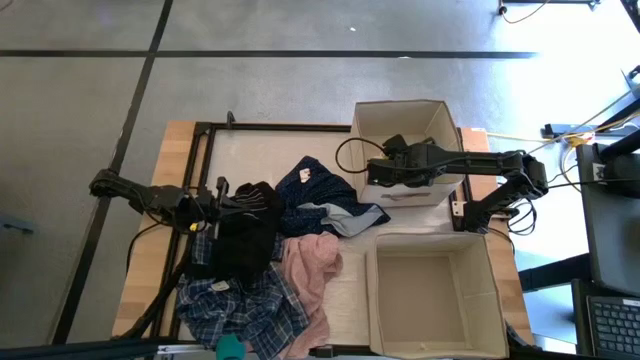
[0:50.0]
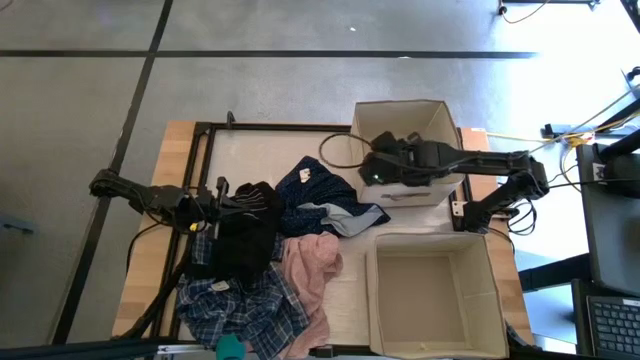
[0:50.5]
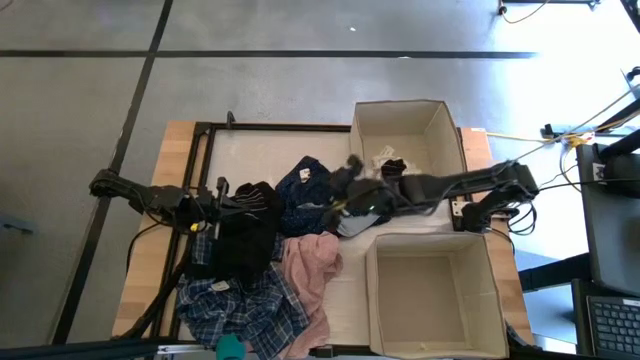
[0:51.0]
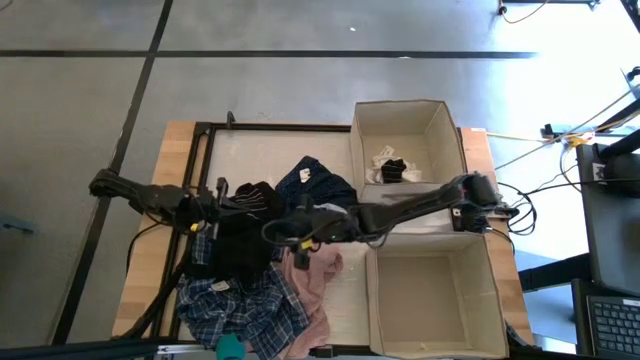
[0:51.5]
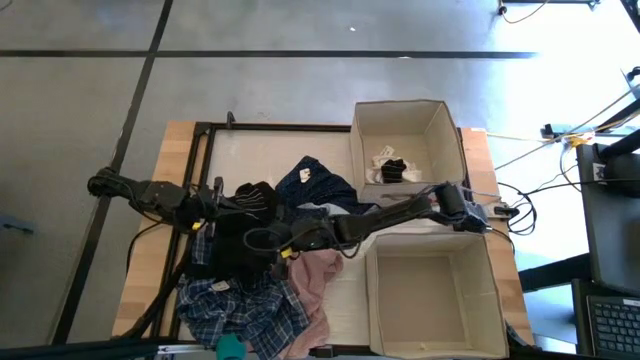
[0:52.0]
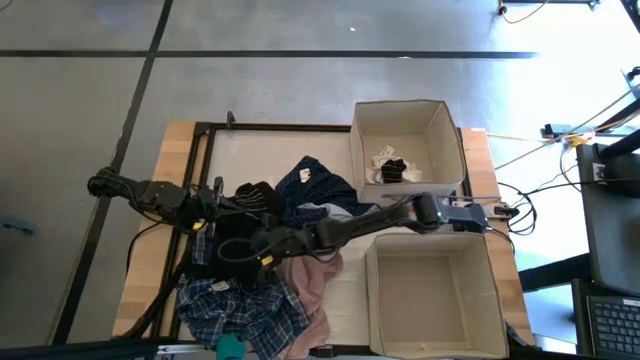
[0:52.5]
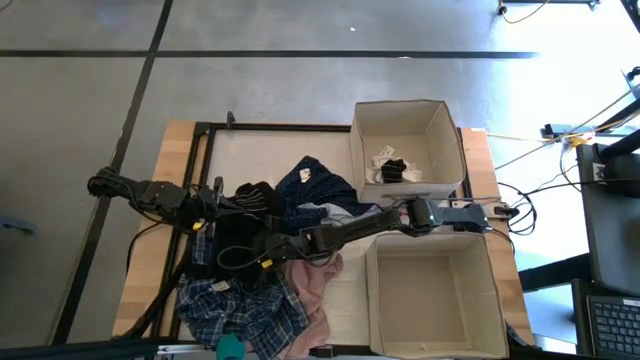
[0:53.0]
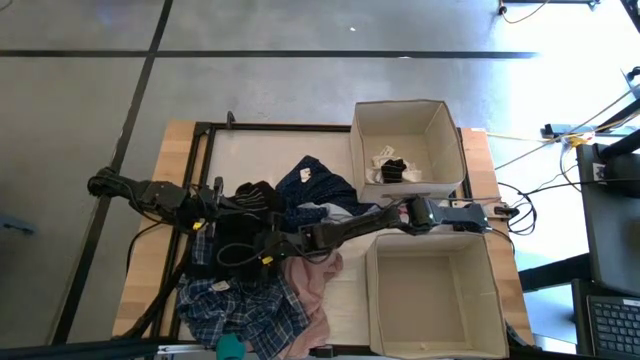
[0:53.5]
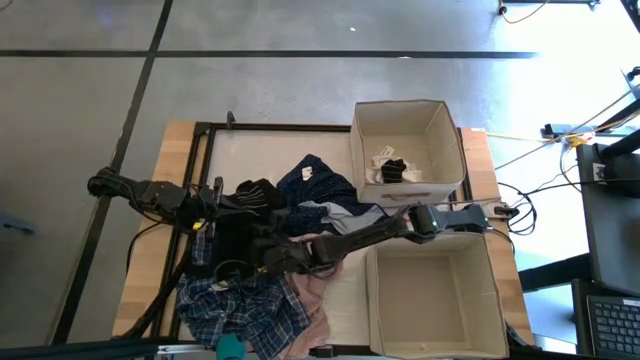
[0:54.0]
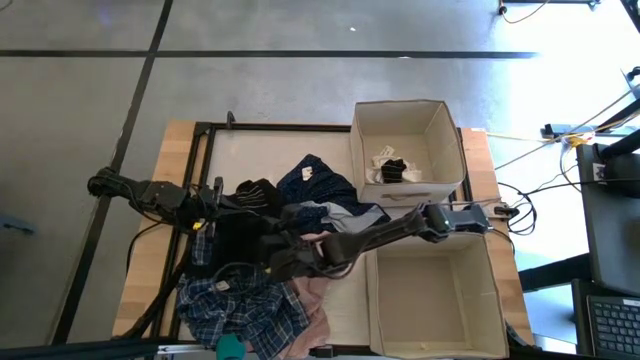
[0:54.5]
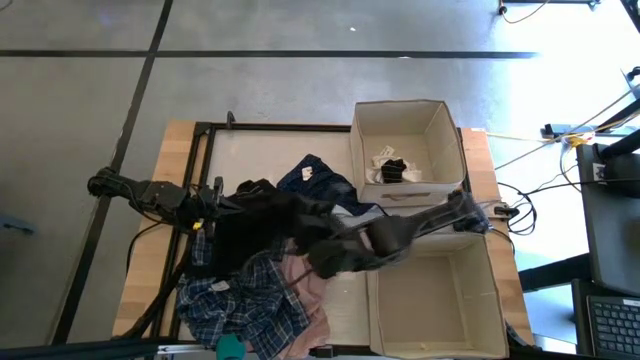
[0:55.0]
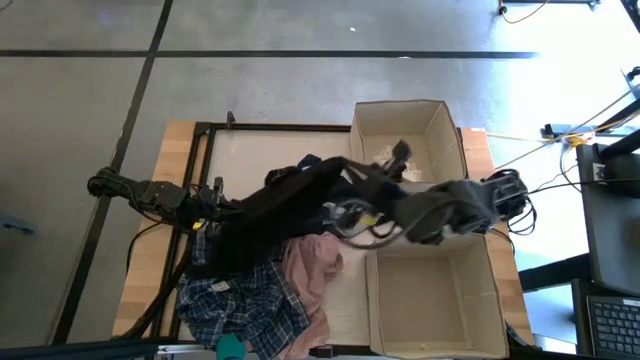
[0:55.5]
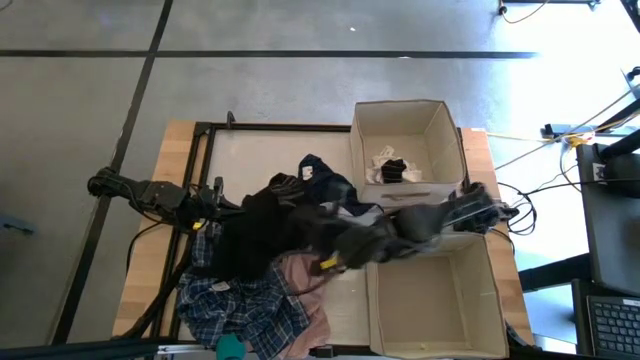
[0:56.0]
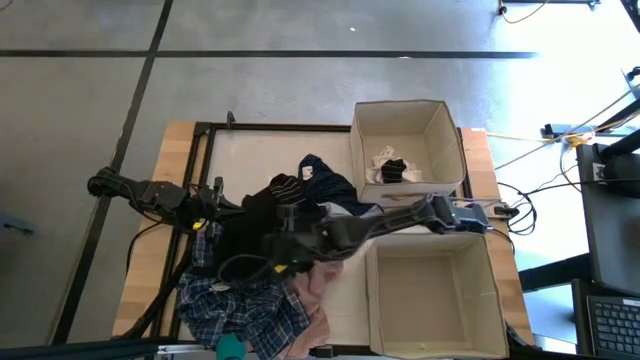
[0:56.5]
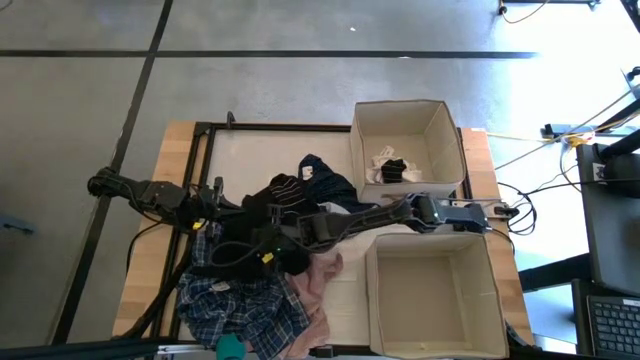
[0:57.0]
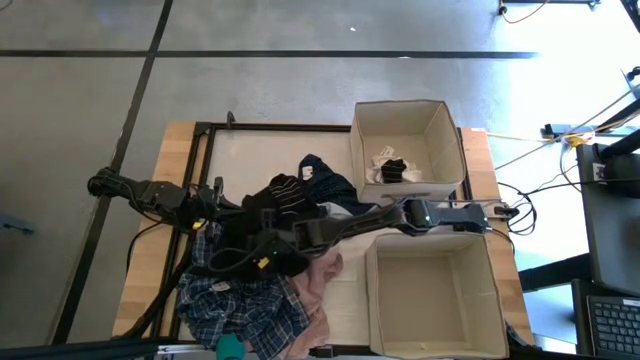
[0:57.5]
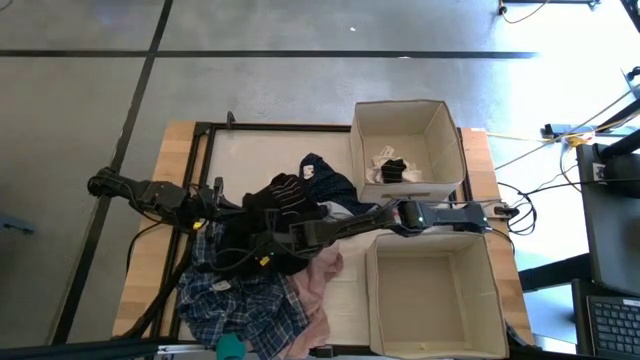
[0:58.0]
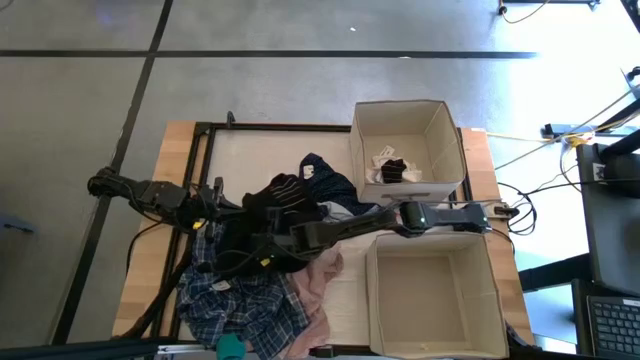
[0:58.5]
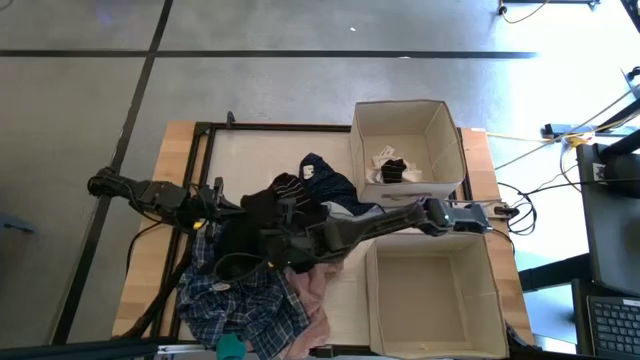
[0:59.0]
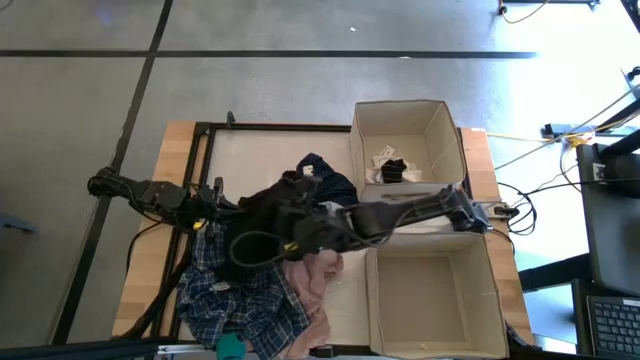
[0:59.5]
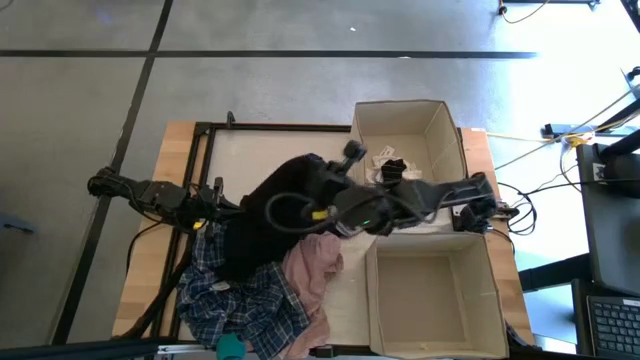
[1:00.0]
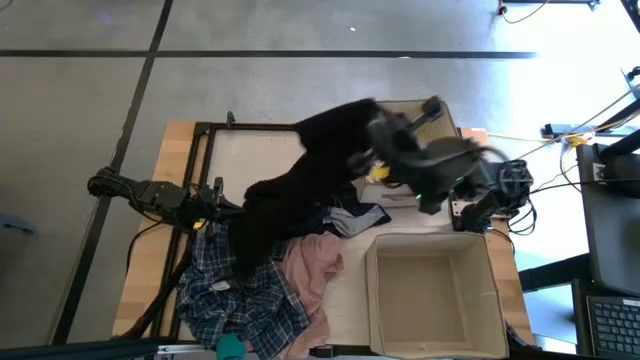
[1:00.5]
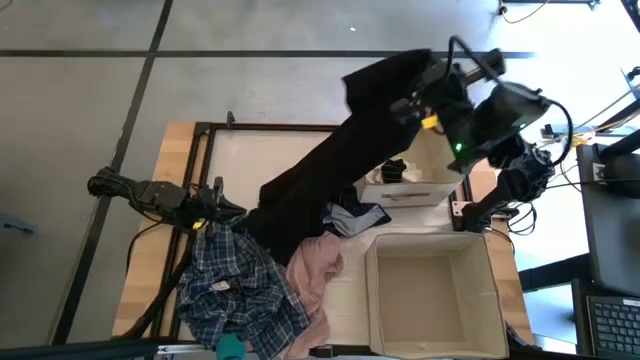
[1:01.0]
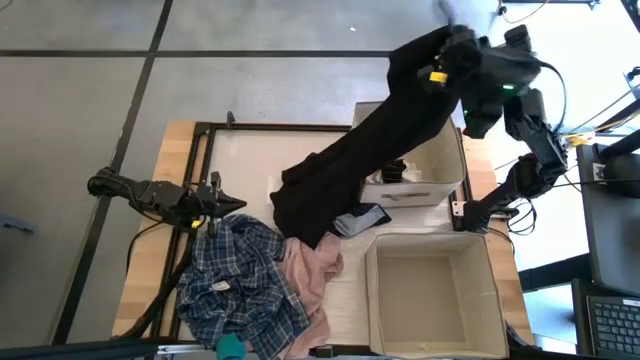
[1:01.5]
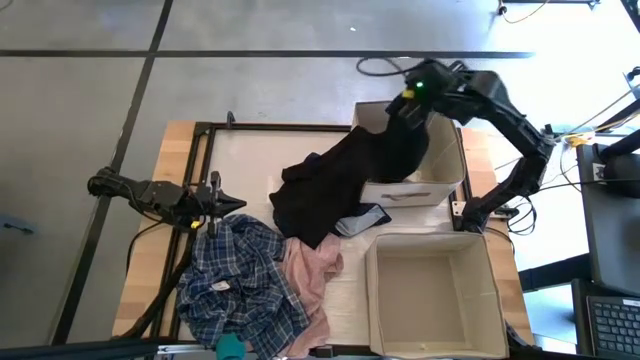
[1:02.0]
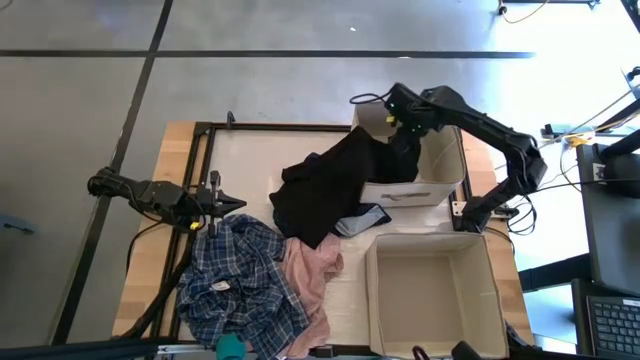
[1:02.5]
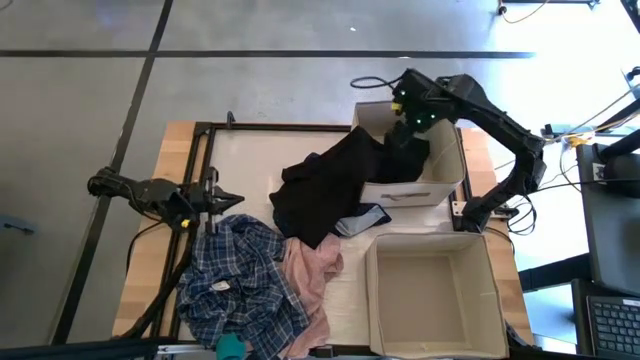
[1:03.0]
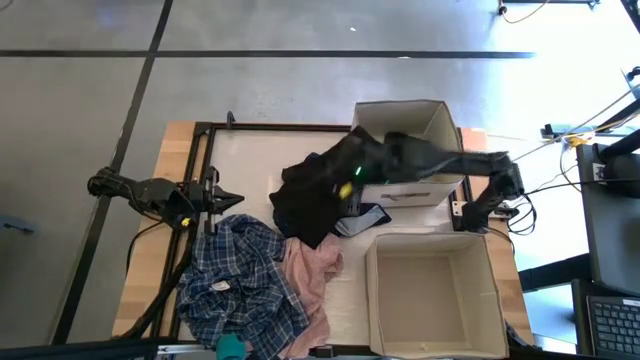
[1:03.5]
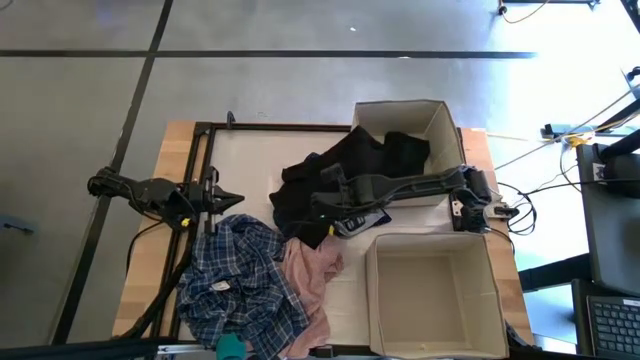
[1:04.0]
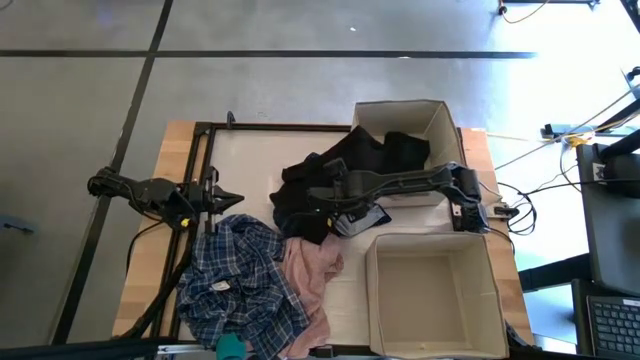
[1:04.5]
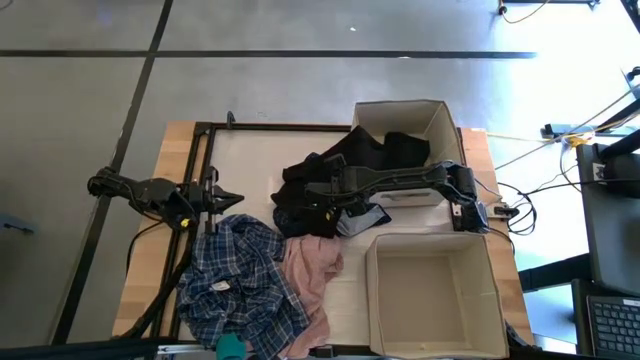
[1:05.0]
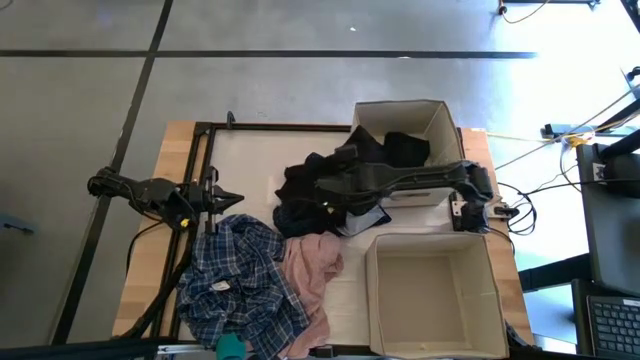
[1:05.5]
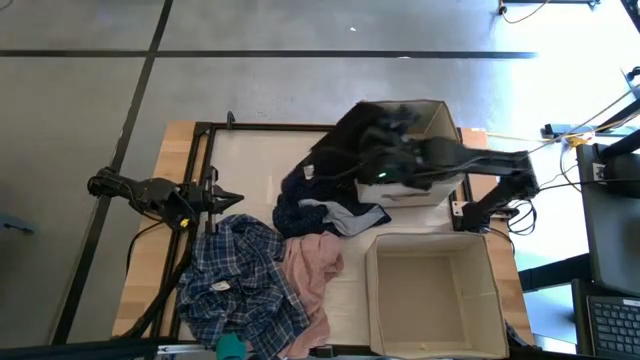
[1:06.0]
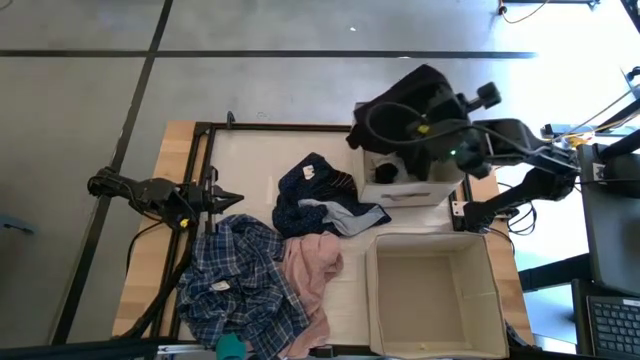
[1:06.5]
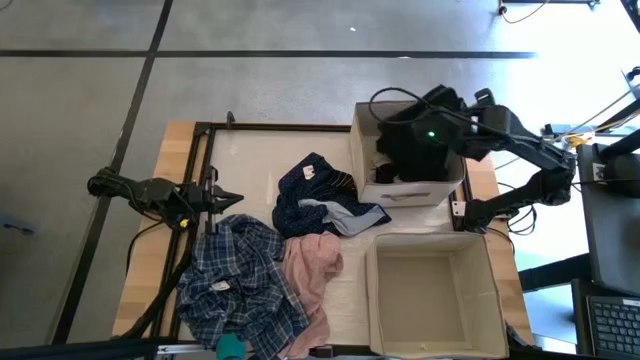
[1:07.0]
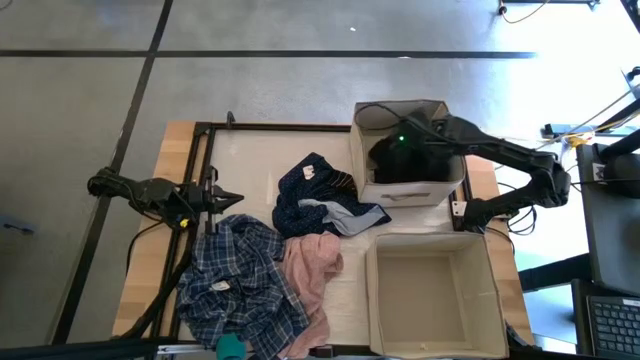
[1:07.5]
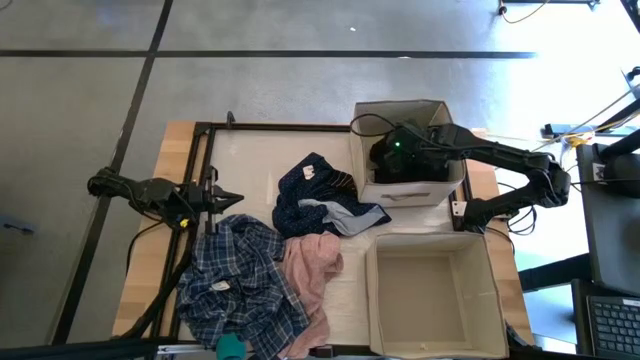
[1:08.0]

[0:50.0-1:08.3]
Task: Sort clothes
Put the black shirt into the top laundry organizer

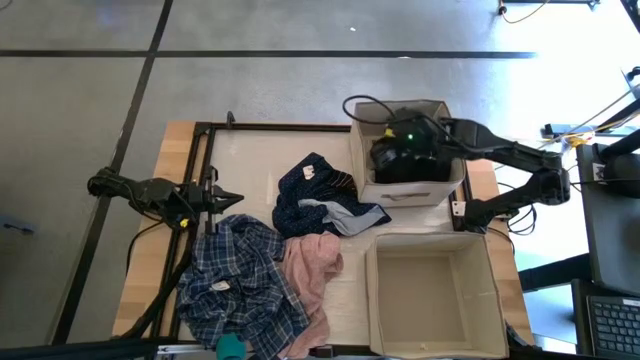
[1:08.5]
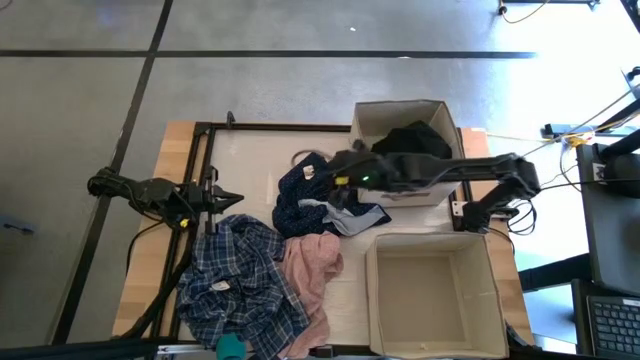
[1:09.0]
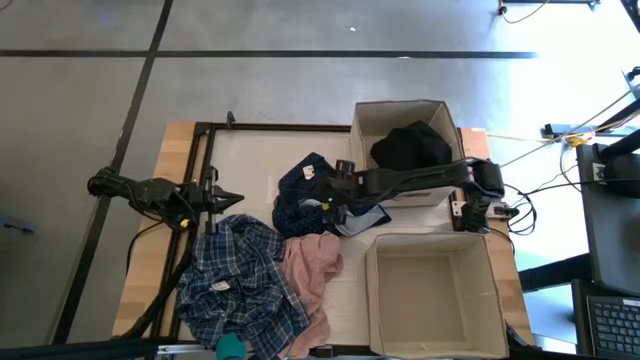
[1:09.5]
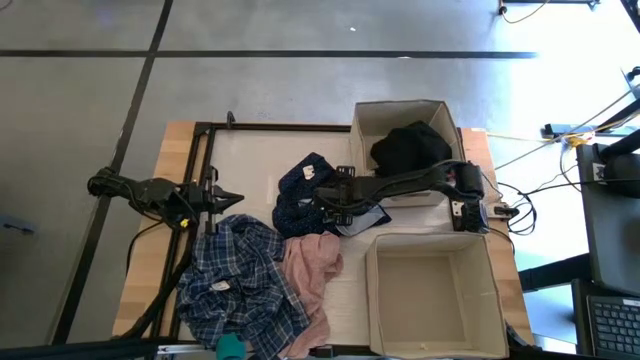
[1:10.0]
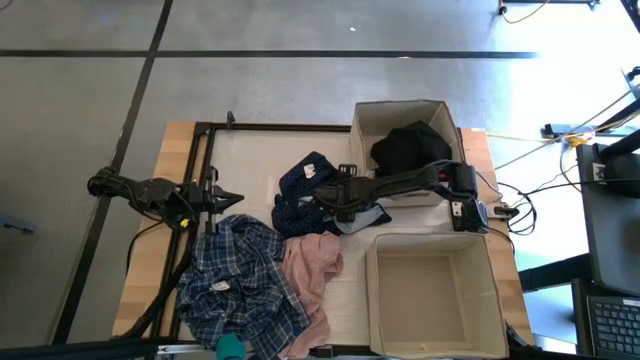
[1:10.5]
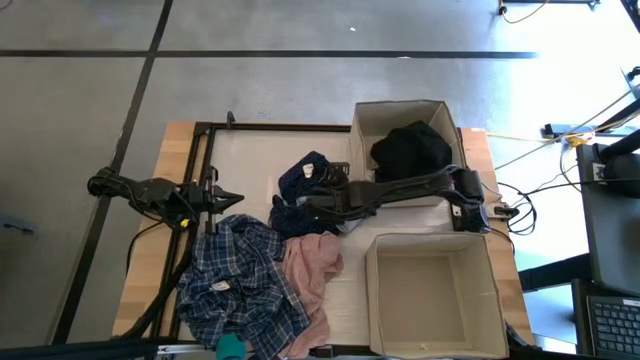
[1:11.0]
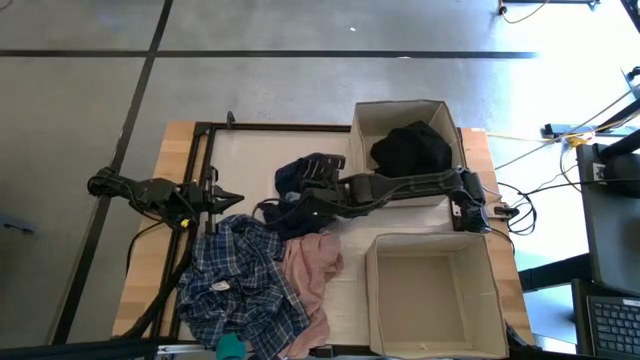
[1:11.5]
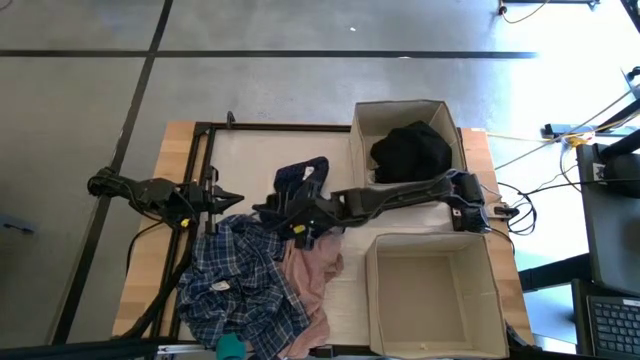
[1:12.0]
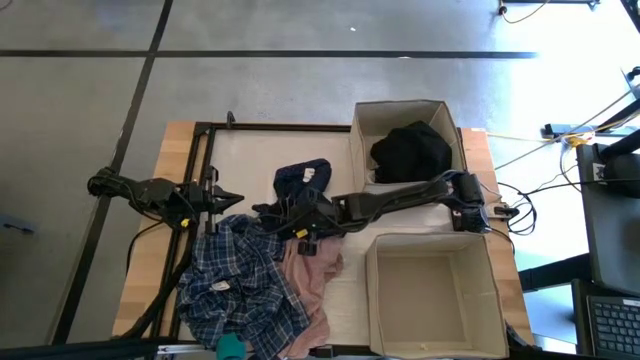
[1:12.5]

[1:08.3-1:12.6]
Put the black striped sock into the top laundry organizer
